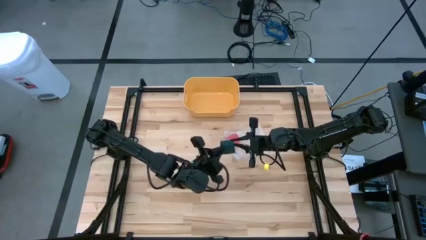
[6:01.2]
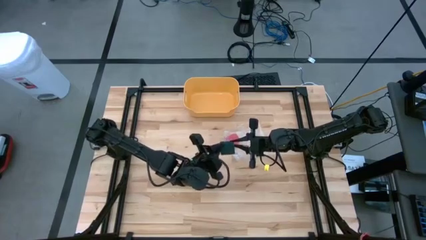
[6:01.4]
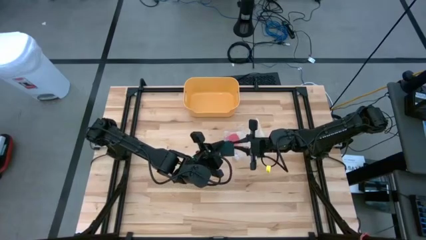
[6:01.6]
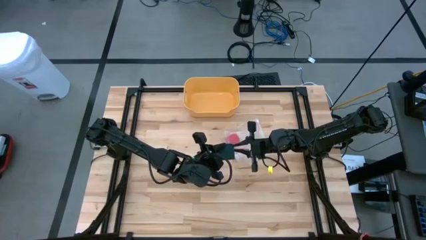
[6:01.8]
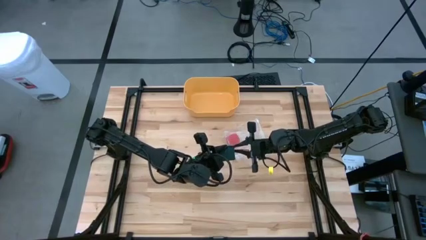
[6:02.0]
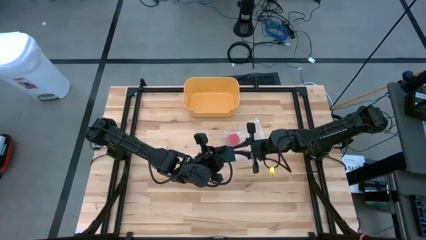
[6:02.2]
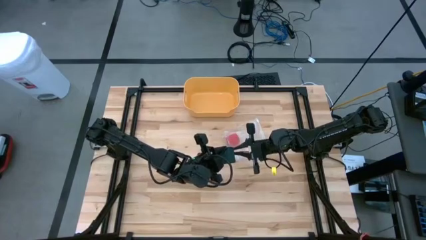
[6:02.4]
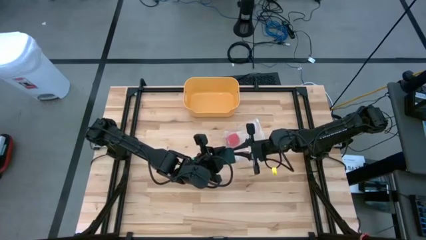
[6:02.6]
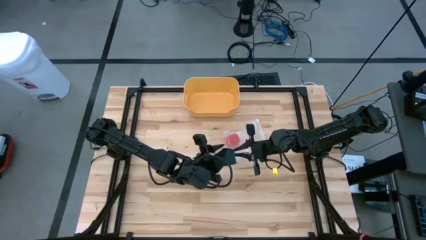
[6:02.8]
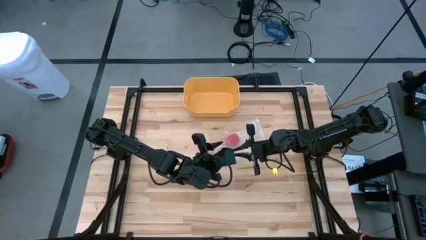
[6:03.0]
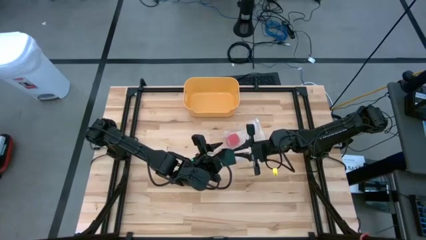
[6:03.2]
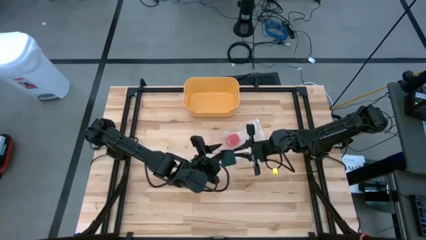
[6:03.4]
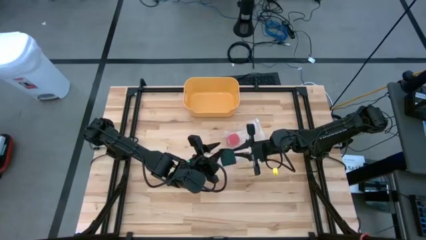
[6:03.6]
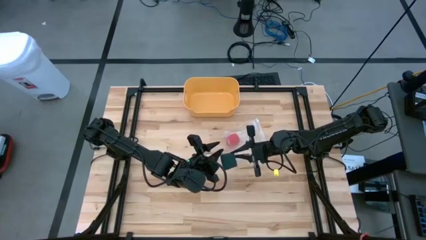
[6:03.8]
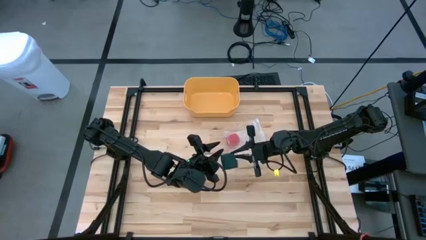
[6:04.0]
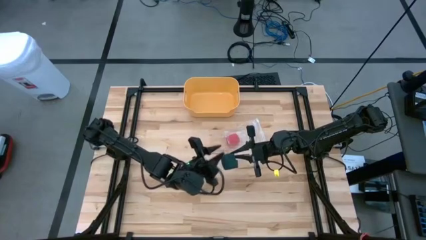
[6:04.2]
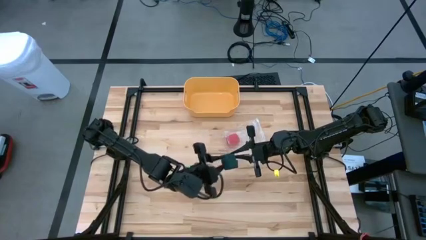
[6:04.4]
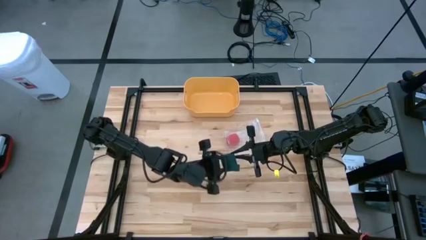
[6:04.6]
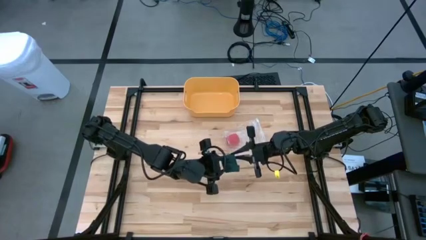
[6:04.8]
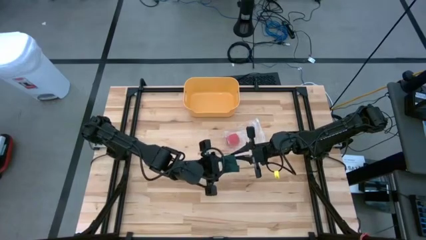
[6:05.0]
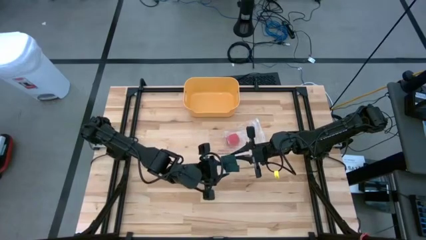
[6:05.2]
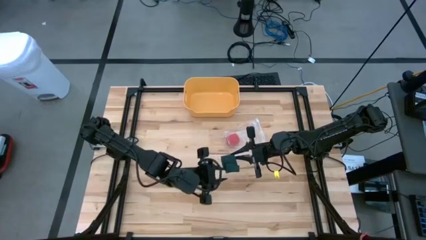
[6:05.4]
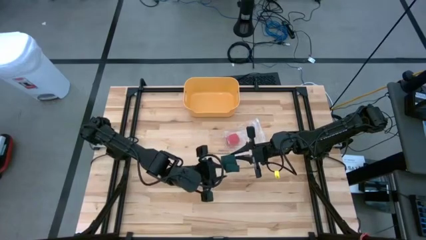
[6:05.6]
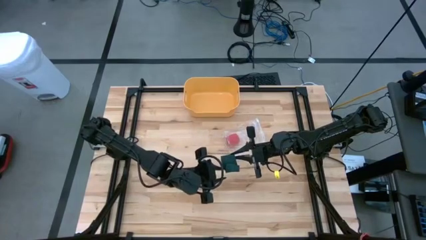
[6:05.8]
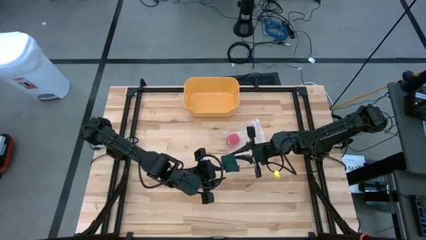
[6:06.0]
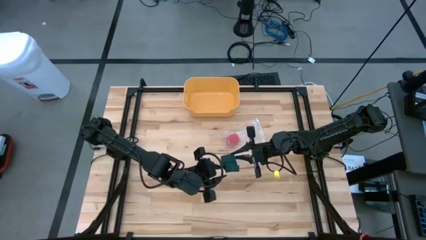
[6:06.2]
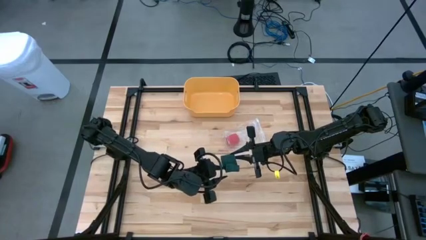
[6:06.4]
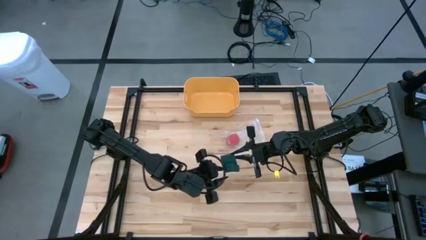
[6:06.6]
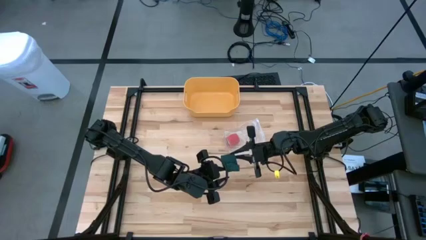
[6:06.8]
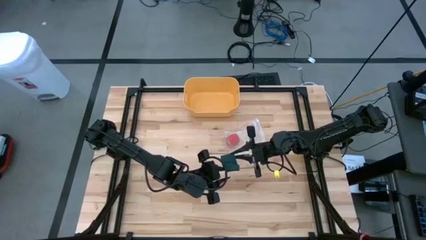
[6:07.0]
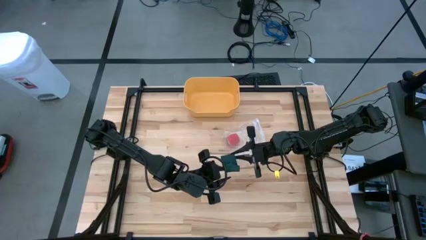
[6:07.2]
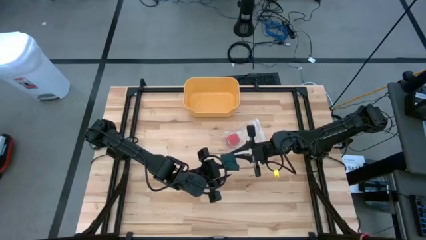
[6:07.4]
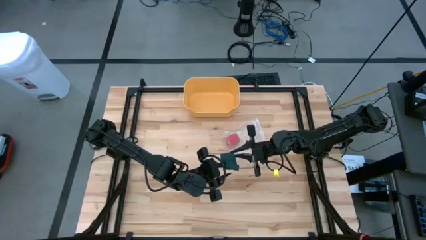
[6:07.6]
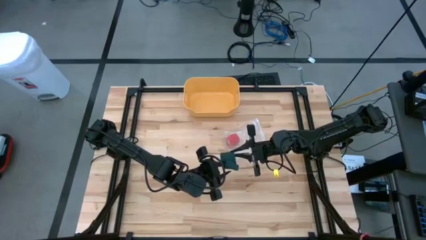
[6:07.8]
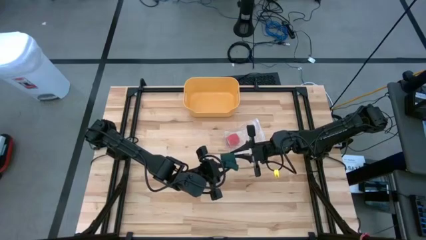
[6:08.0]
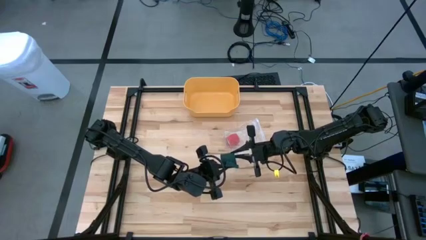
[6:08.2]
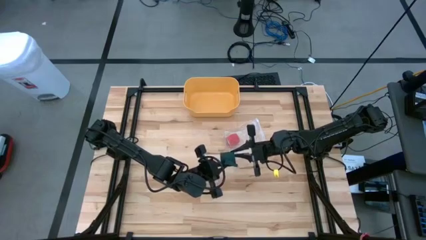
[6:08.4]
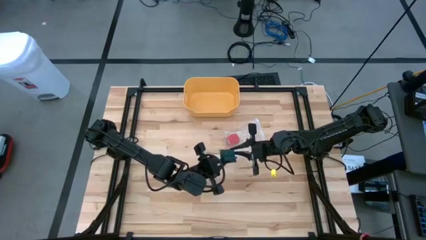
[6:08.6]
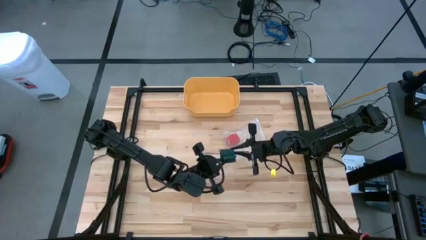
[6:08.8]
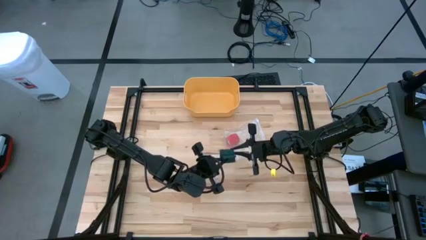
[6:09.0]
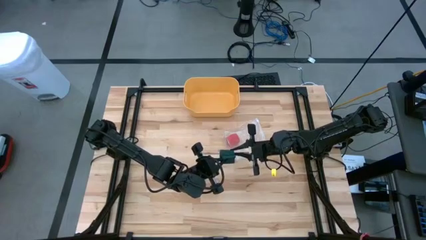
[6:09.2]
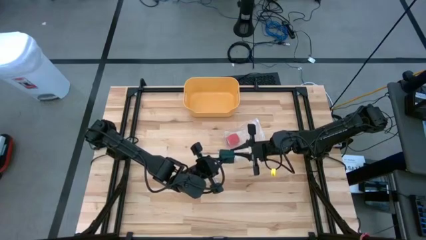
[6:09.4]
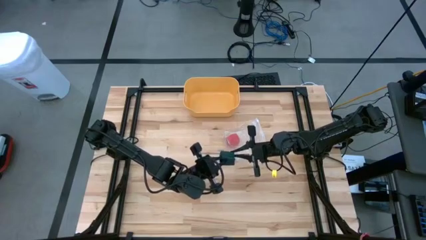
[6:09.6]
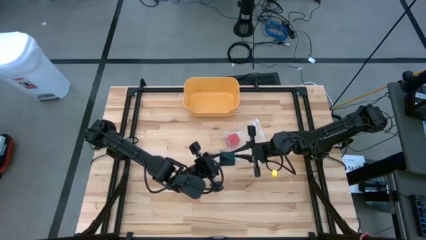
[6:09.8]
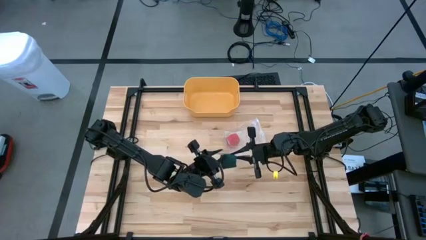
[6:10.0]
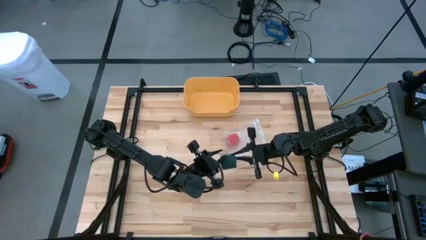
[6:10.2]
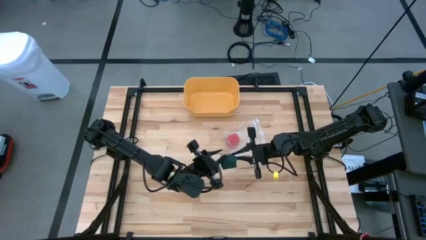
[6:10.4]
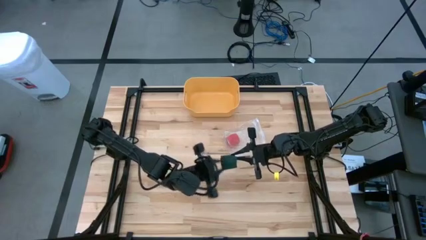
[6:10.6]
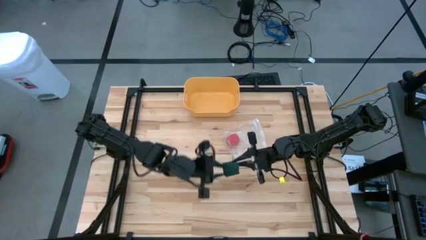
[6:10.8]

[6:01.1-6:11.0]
Task: Roll bandage
Roll the green bandage

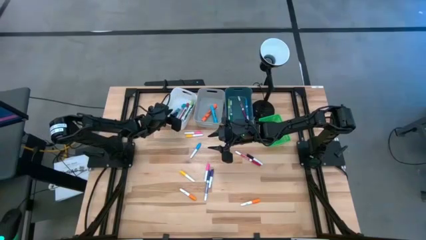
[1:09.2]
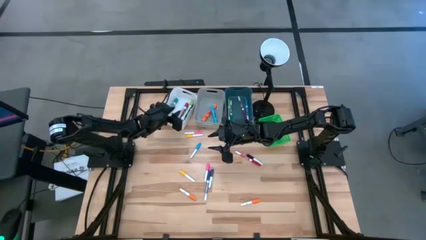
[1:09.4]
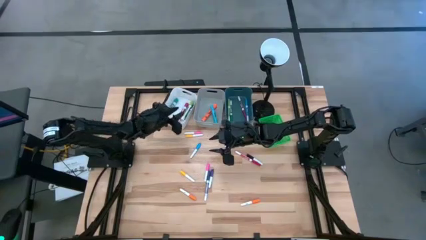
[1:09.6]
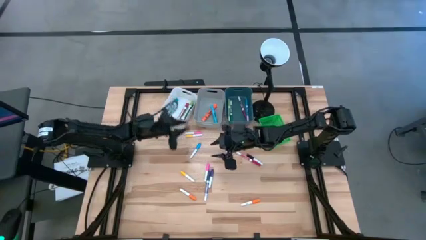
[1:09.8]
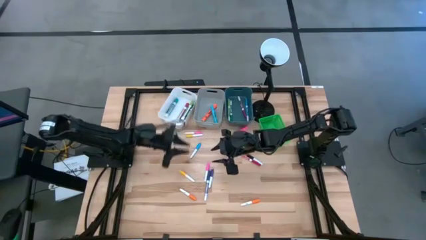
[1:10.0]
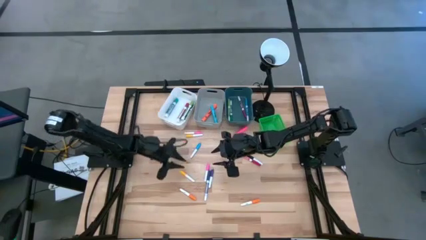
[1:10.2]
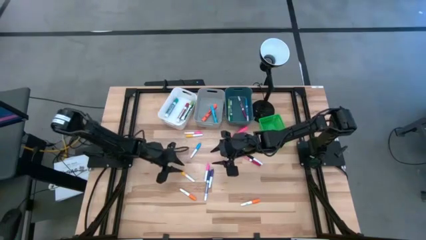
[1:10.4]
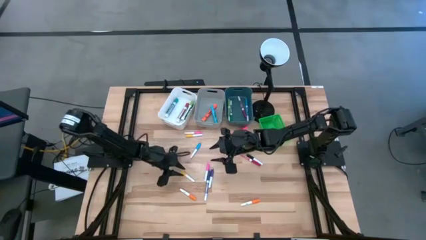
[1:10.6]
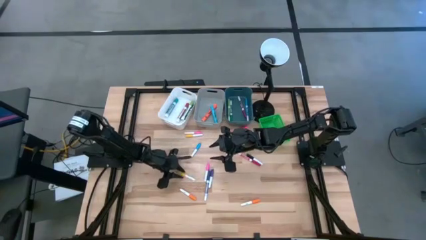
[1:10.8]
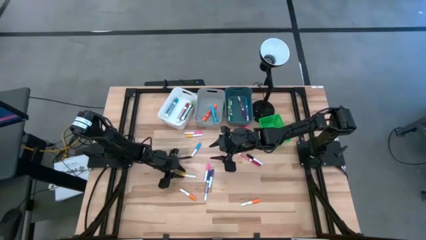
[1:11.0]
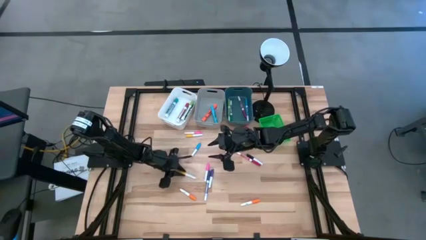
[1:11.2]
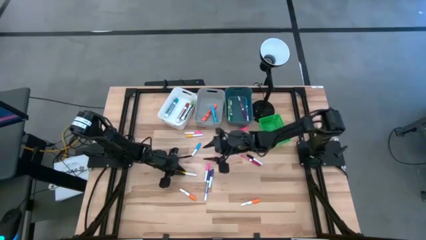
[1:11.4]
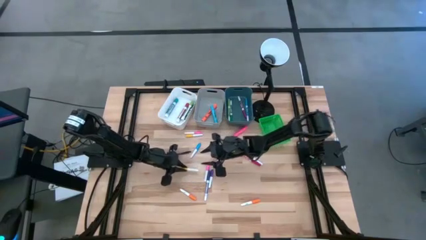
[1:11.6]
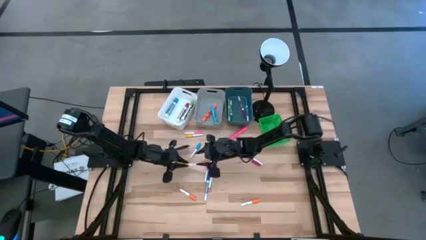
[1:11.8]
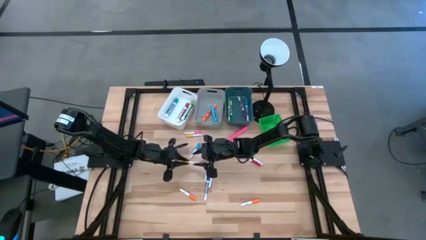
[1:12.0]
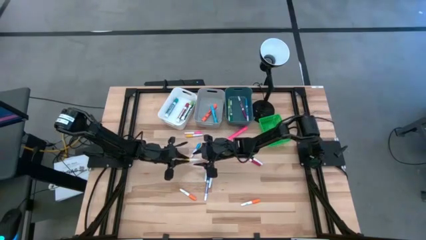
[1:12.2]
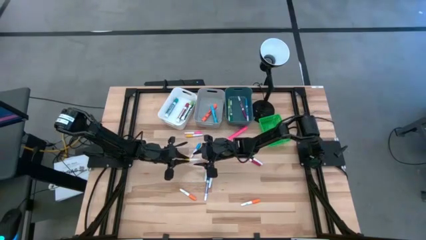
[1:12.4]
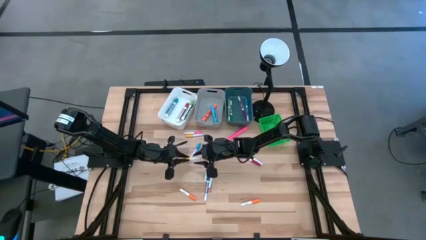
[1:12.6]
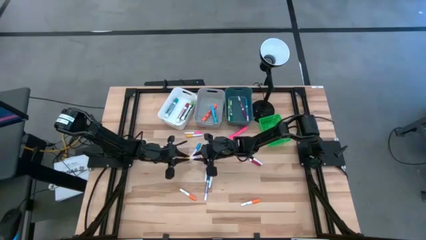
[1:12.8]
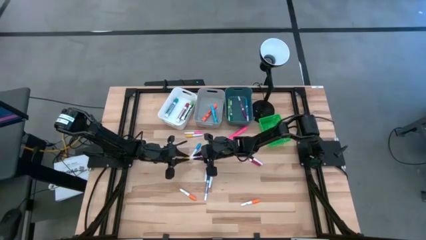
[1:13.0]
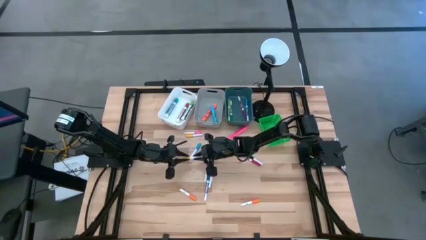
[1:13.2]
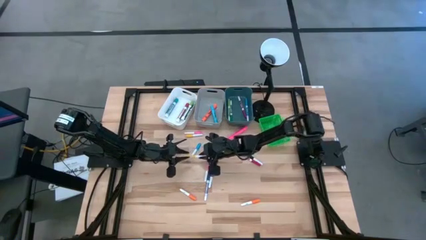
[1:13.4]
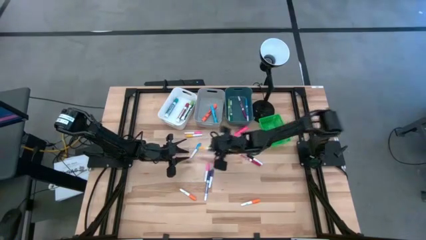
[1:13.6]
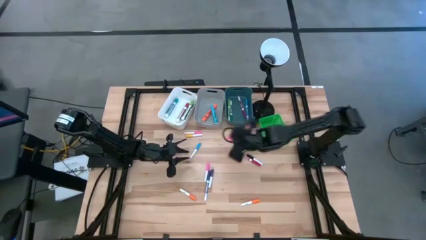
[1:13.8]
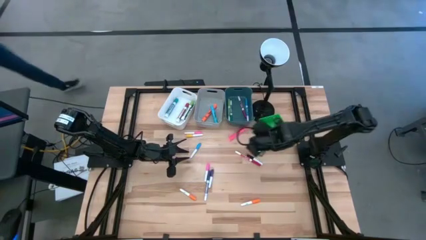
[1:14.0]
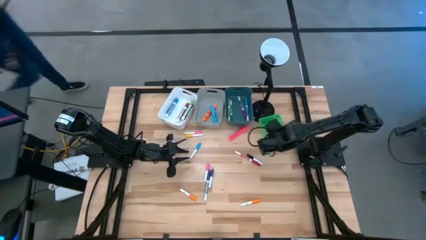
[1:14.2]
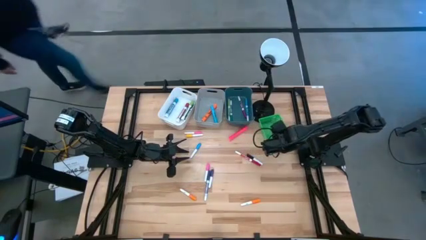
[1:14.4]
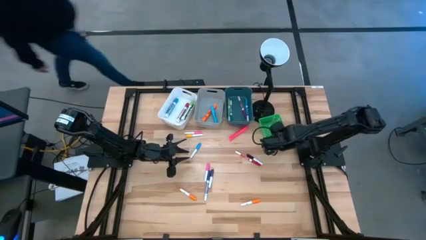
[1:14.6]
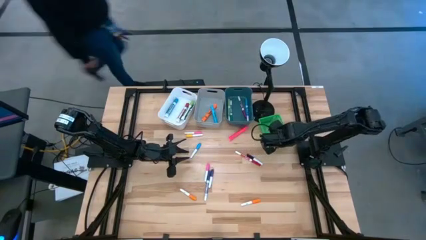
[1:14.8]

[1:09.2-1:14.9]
Task: Pick & Place Markers
Put the yellow highlighter pen into the green bin
